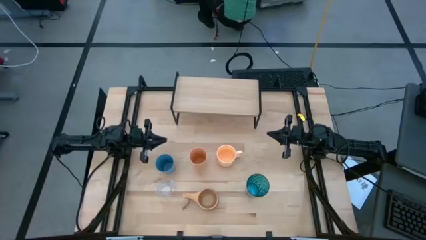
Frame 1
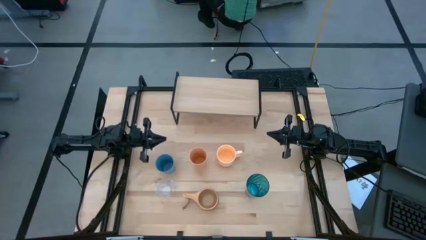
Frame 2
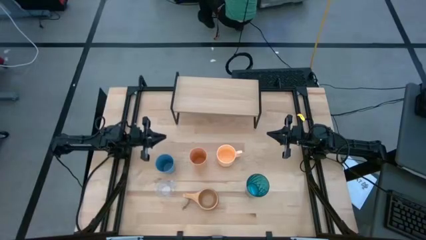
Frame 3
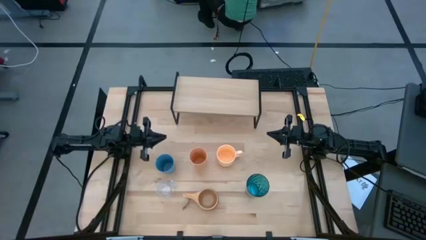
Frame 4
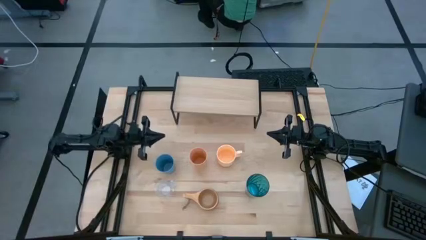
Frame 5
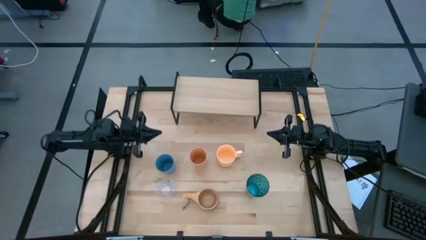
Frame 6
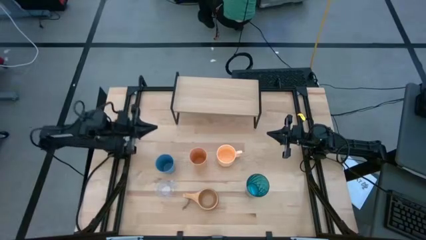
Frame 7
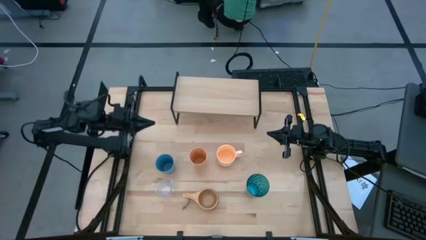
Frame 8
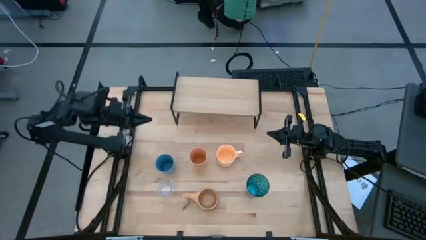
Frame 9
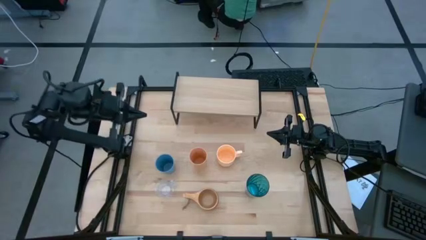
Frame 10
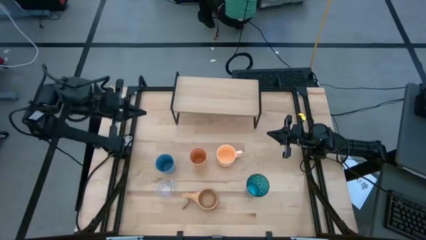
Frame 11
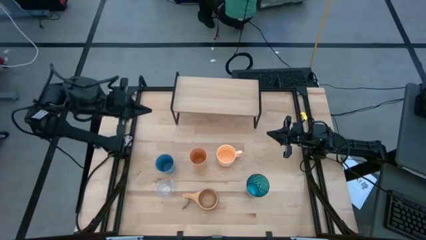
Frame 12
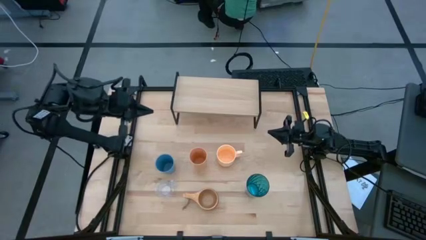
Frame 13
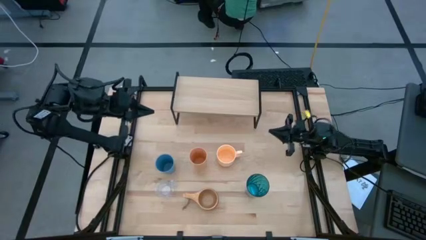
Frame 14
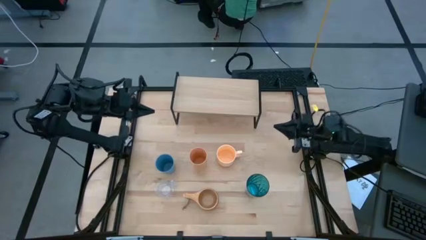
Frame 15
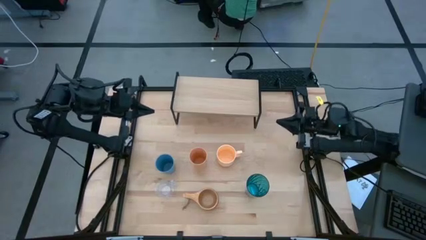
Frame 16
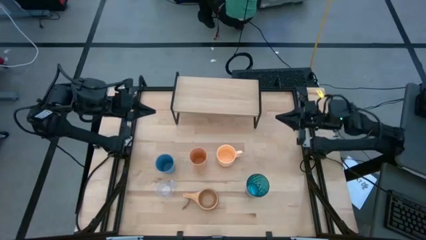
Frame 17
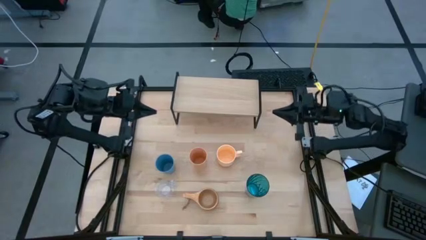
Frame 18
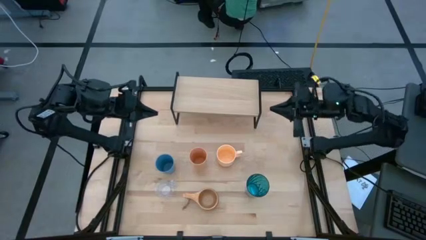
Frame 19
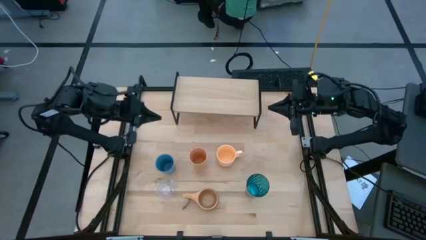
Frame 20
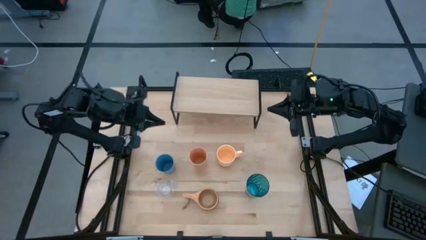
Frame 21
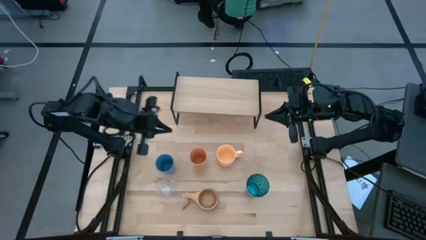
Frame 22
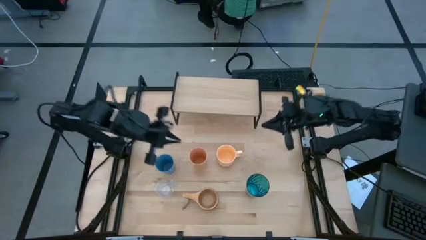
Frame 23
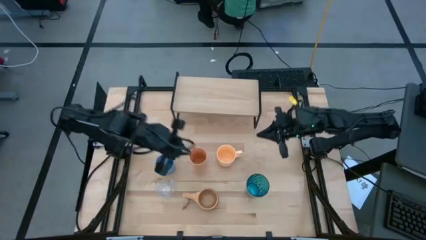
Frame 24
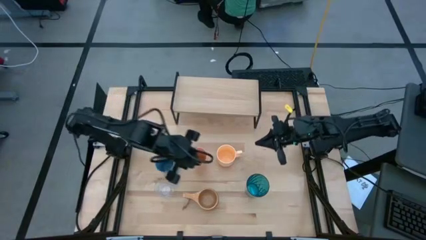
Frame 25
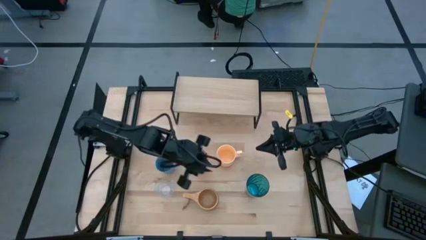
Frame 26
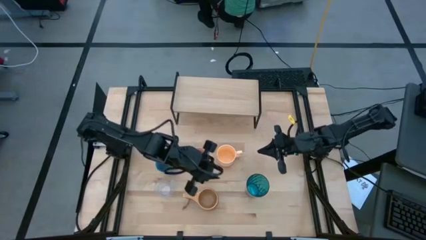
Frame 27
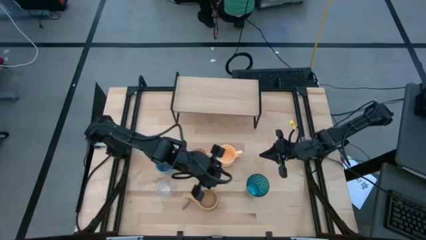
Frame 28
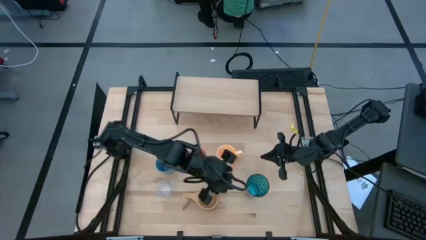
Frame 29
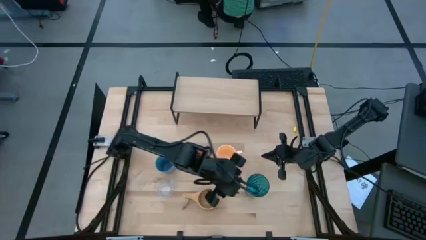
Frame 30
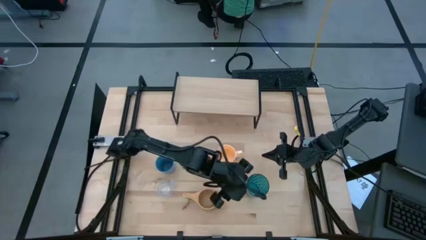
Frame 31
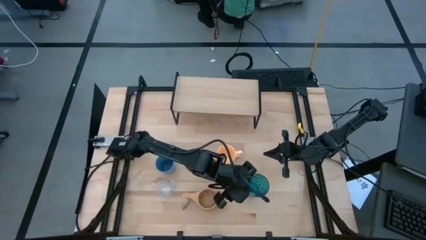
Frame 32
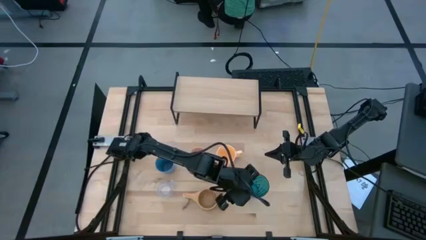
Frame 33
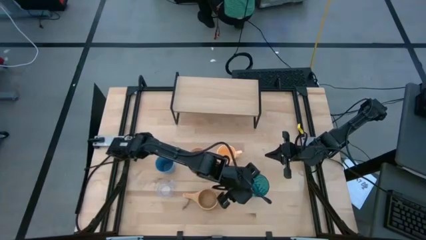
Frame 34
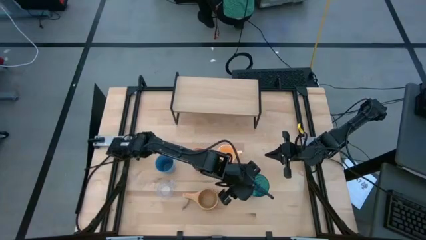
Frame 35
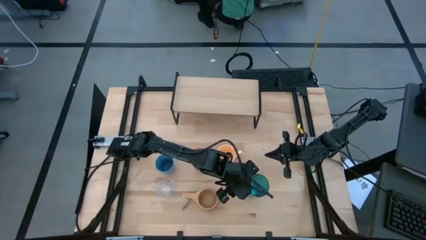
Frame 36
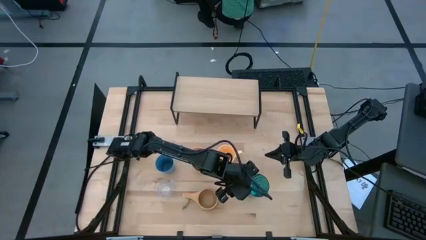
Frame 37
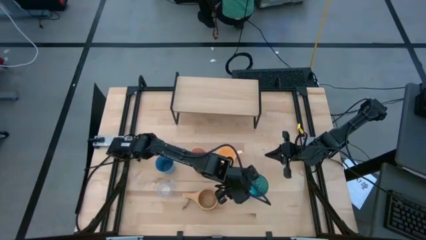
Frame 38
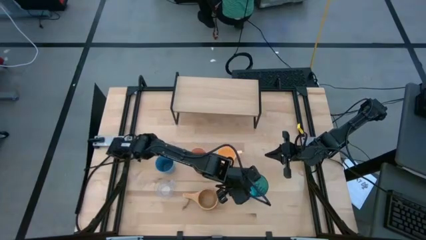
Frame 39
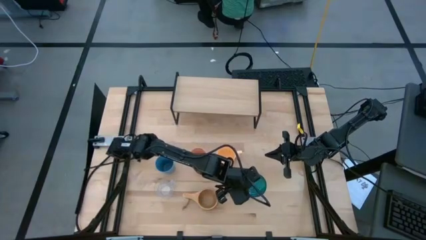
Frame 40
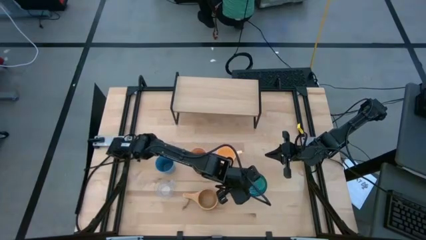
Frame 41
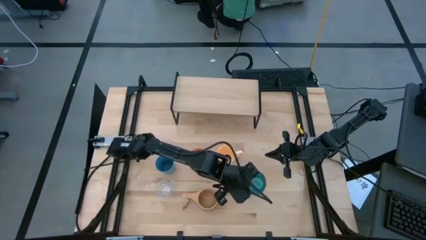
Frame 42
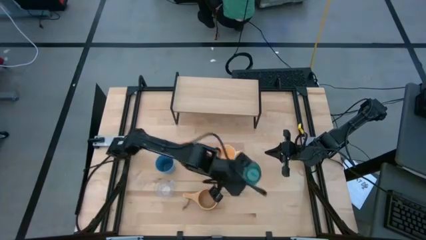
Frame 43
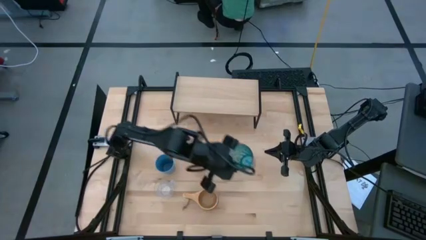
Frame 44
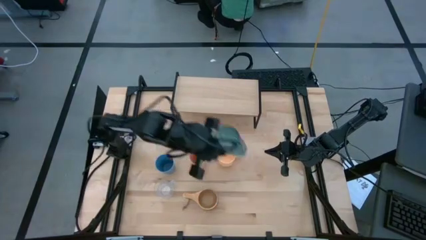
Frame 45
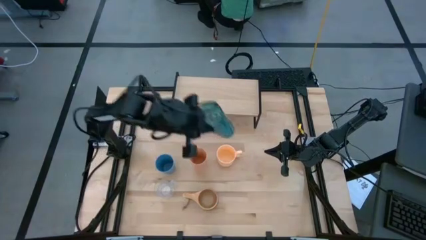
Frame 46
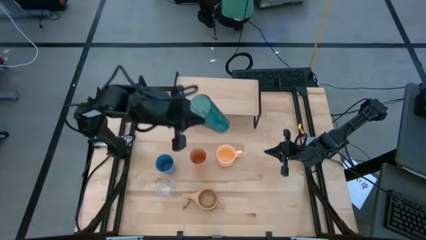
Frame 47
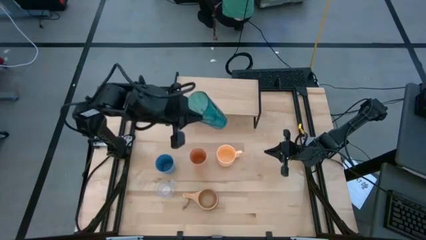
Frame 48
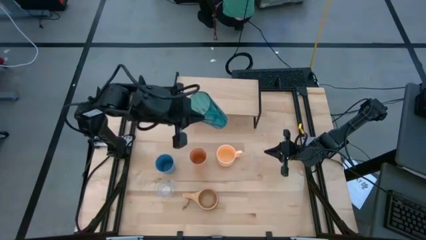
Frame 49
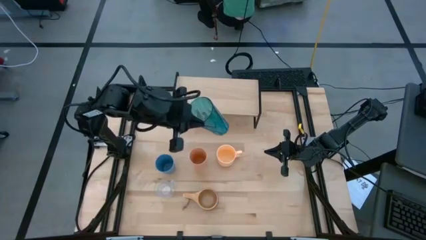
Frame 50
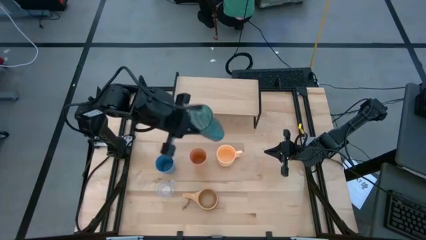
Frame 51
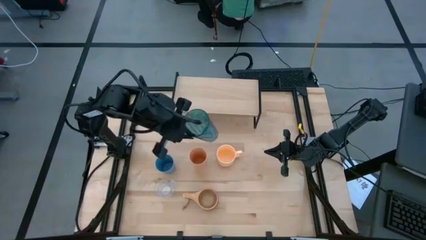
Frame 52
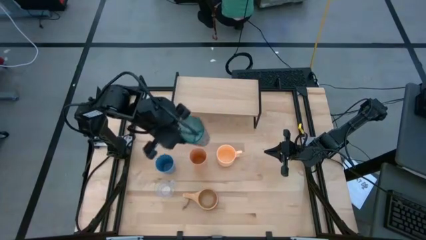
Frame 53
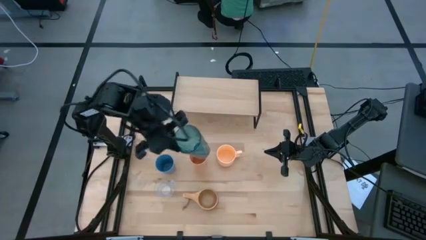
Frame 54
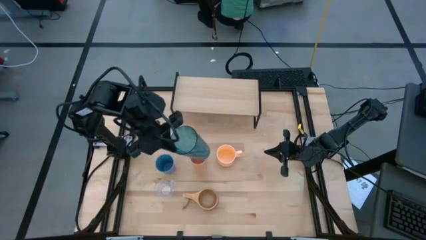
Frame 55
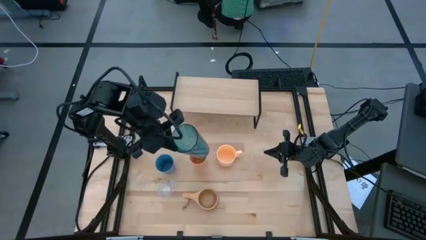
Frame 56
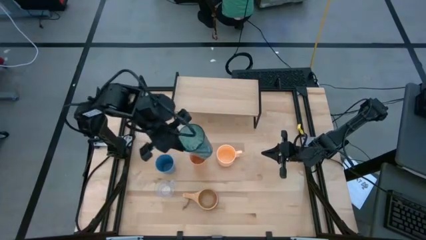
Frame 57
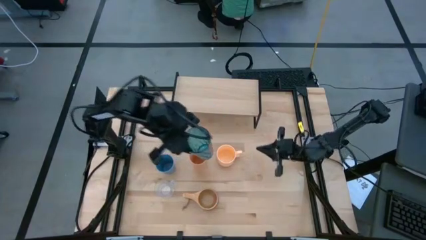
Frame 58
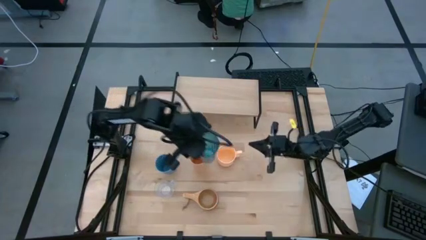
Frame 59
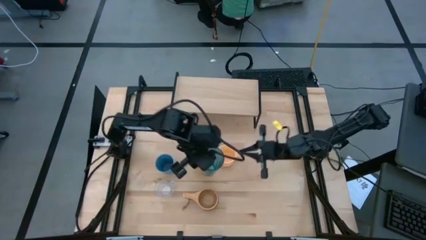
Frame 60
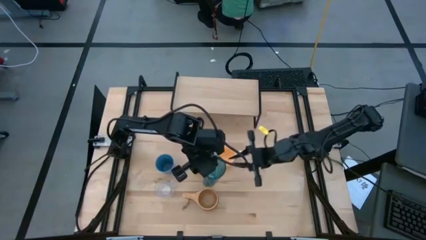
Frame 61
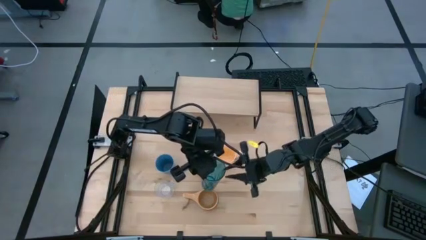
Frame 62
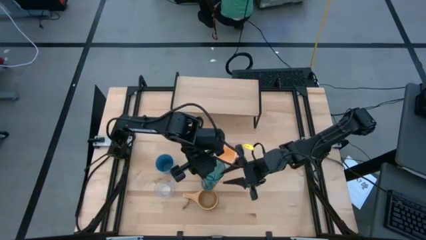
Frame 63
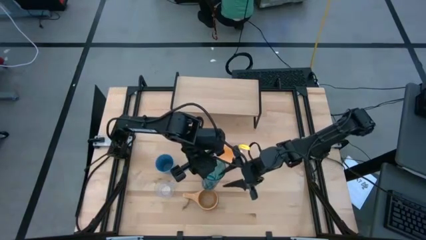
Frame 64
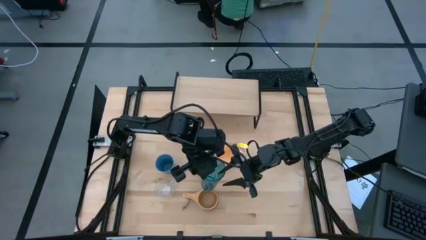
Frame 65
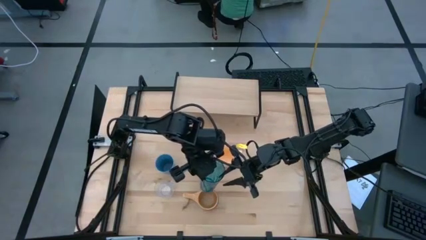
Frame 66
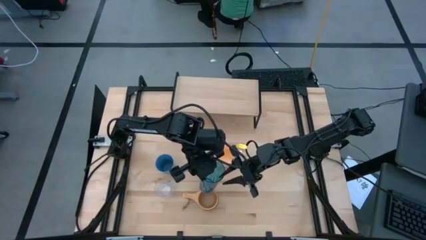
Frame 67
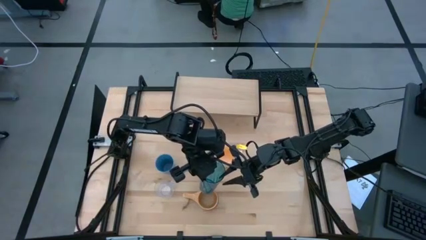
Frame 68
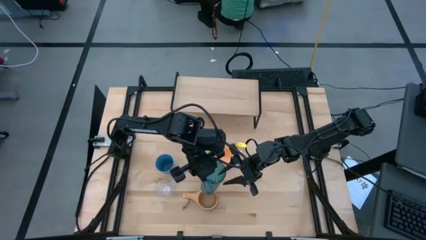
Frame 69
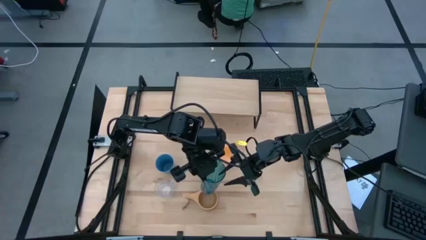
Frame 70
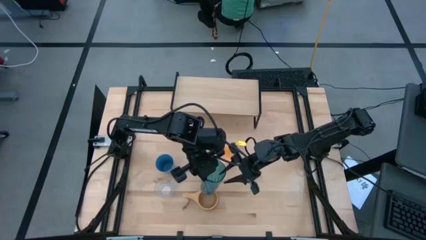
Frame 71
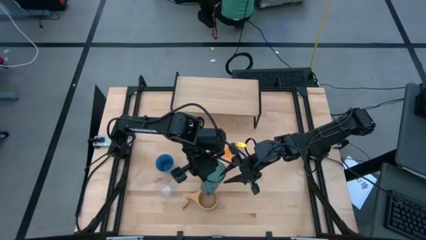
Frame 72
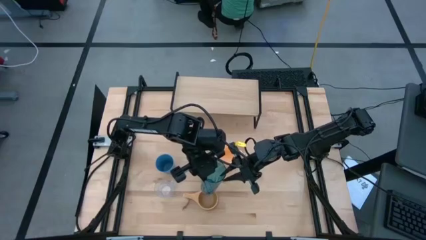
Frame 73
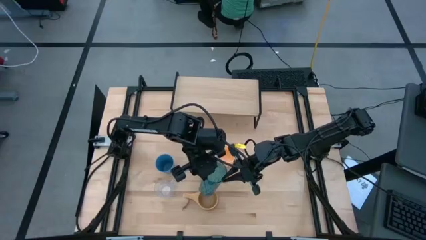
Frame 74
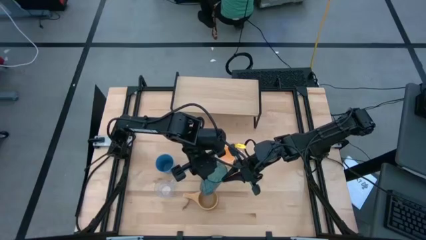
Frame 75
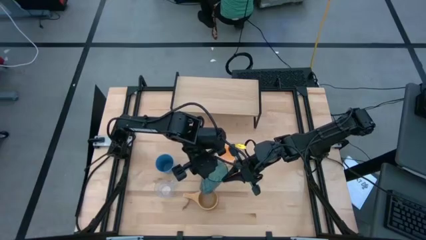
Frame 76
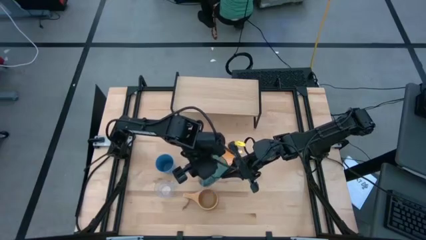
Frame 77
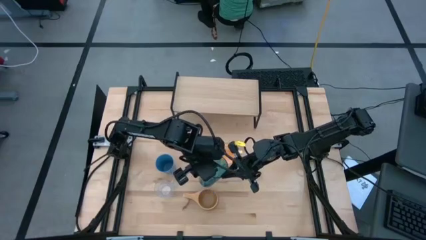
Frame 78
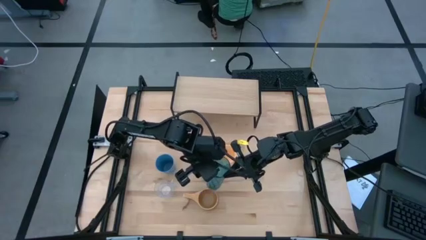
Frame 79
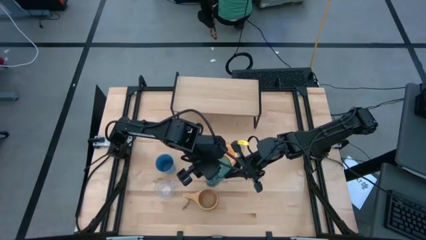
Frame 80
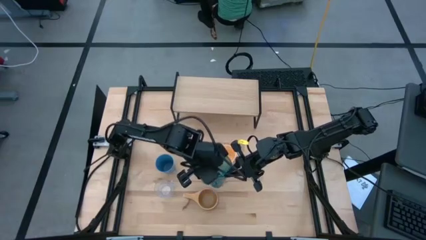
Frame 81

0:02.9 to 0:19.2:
Task: Stack small to large cups/mugs on shelf
Put the blue cup on the shelf
